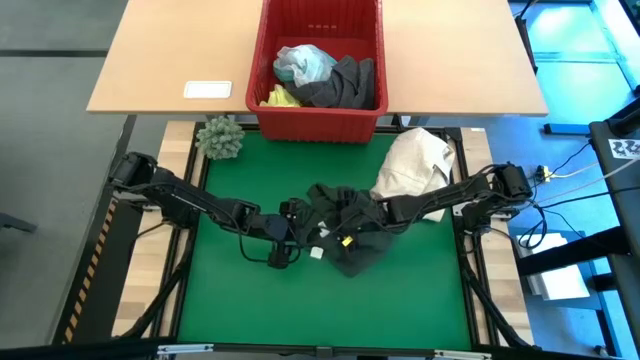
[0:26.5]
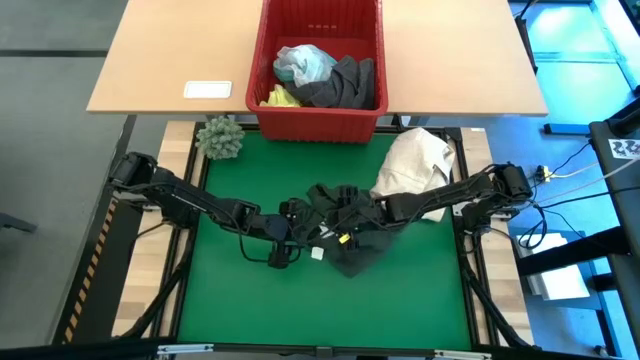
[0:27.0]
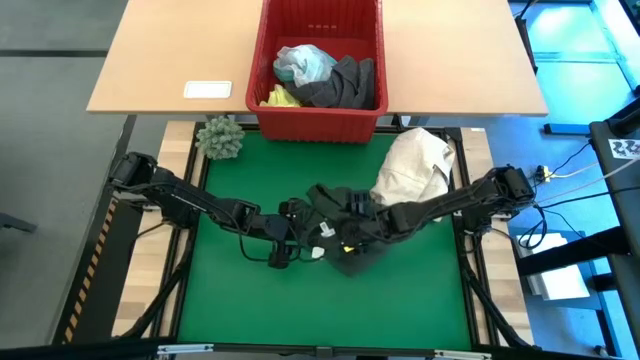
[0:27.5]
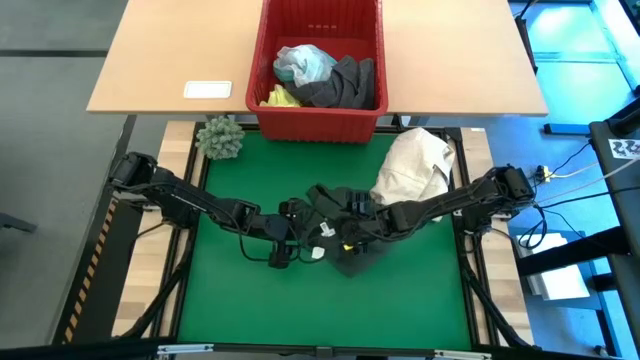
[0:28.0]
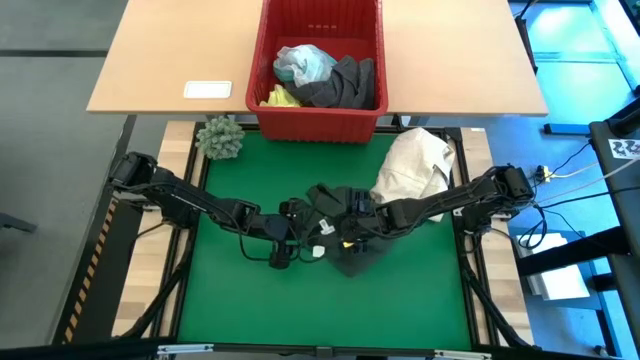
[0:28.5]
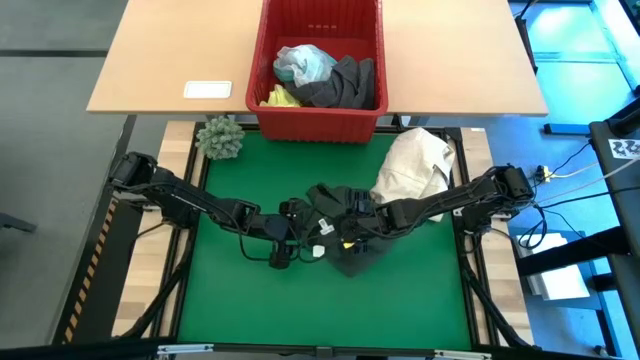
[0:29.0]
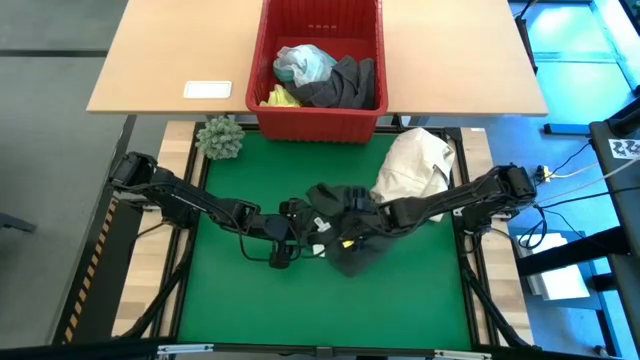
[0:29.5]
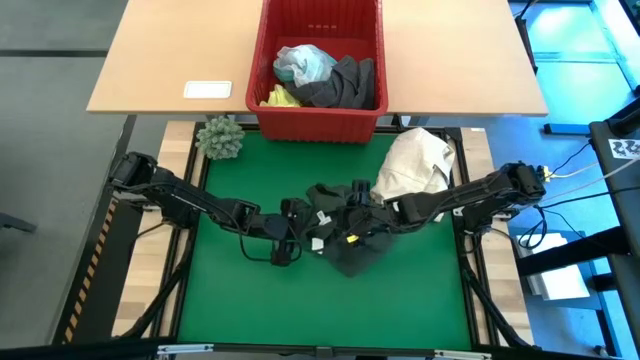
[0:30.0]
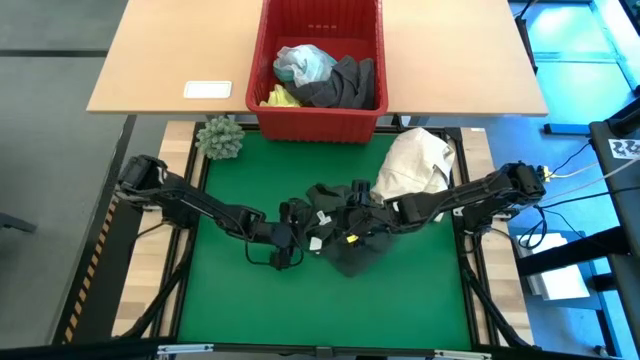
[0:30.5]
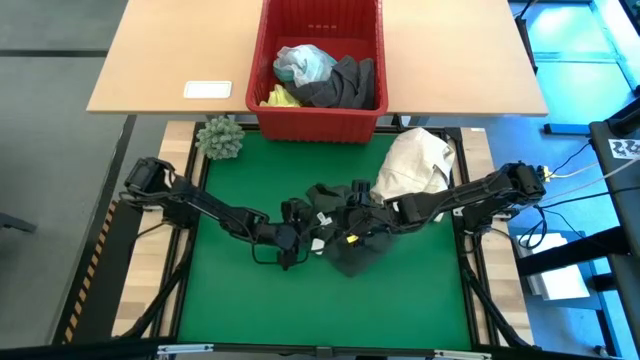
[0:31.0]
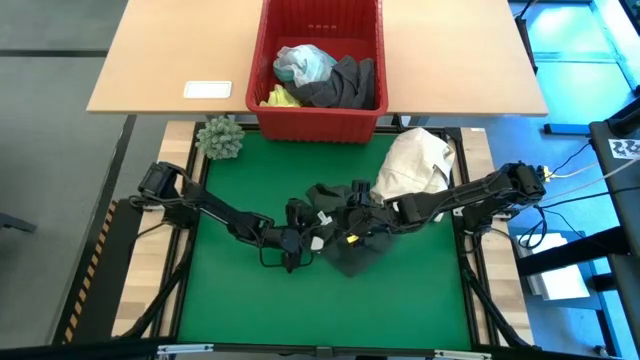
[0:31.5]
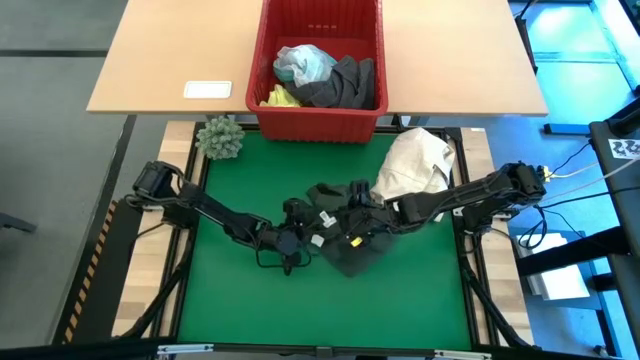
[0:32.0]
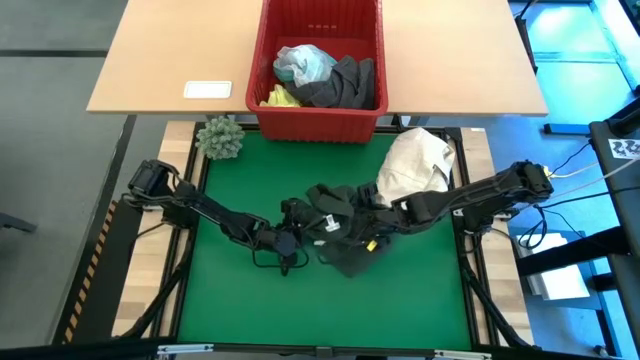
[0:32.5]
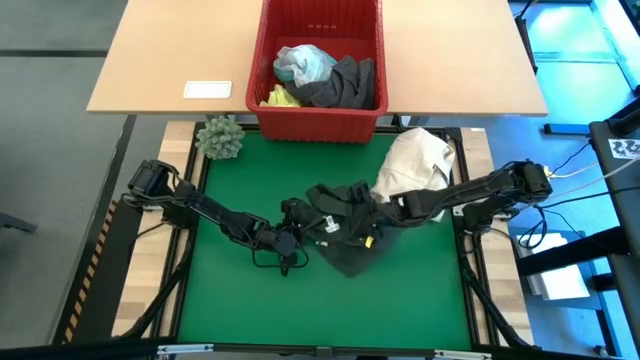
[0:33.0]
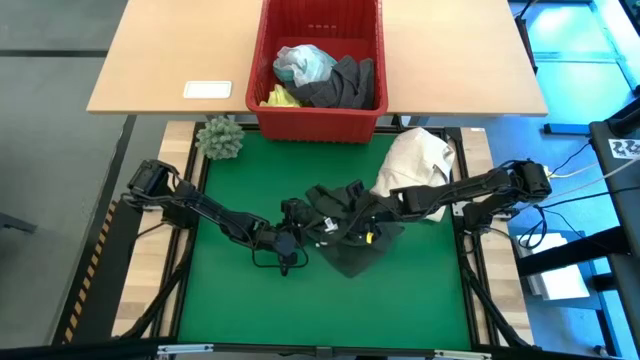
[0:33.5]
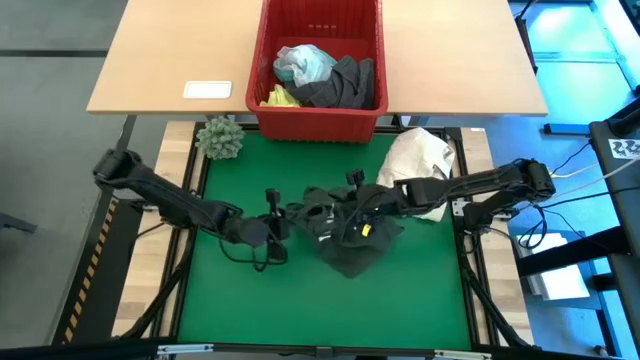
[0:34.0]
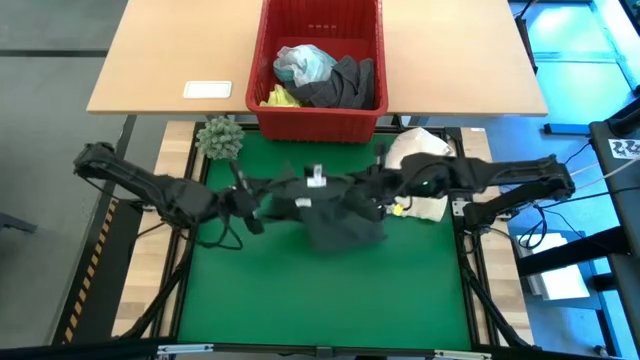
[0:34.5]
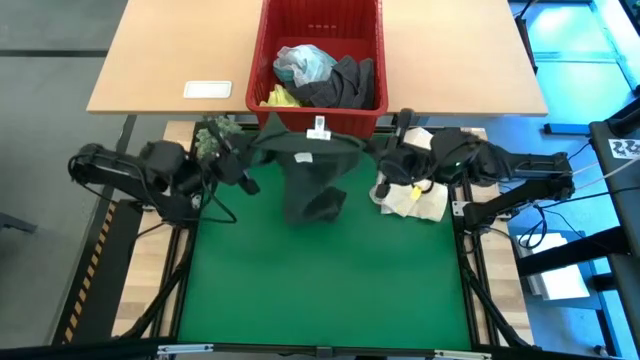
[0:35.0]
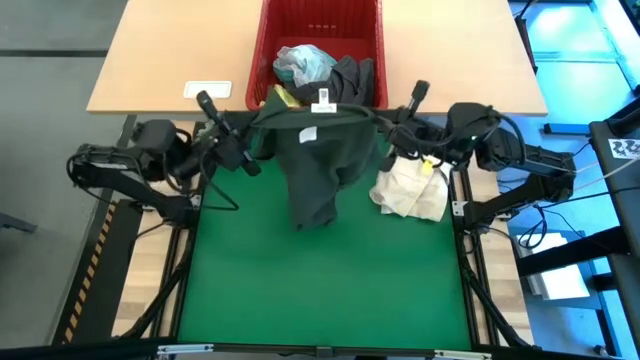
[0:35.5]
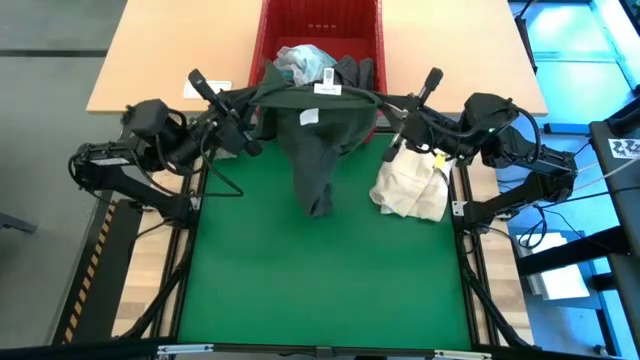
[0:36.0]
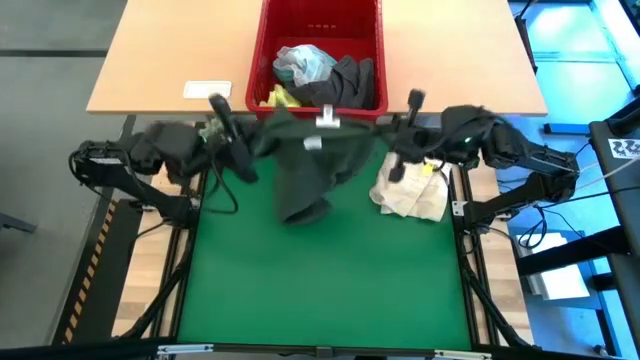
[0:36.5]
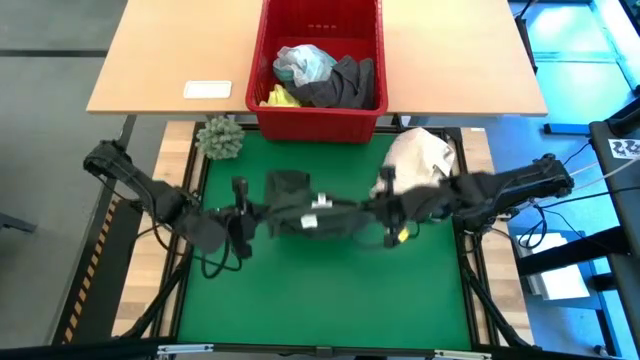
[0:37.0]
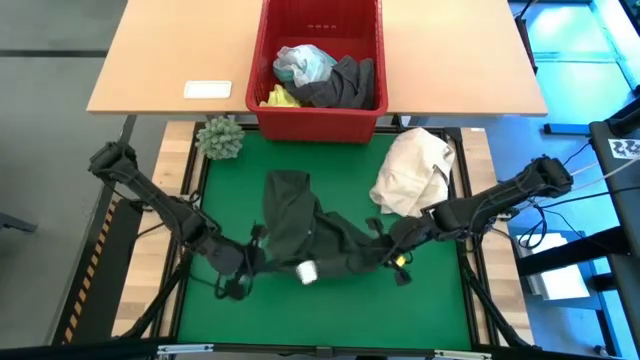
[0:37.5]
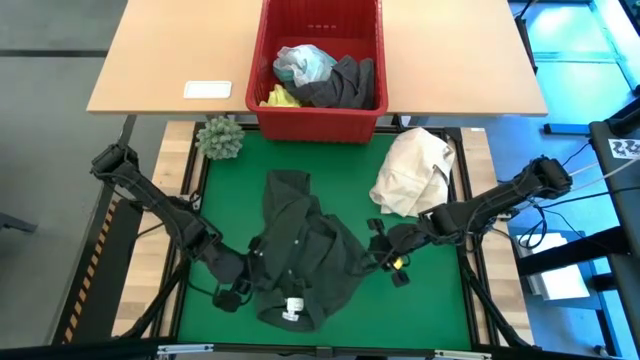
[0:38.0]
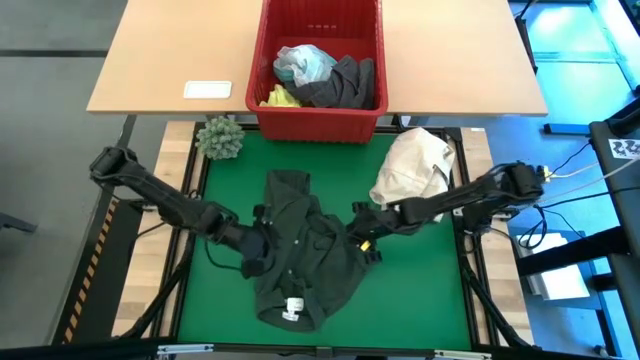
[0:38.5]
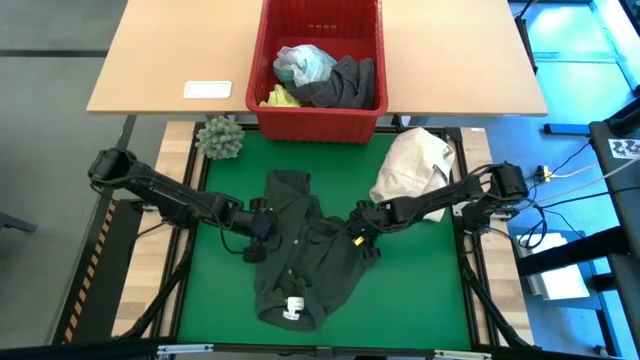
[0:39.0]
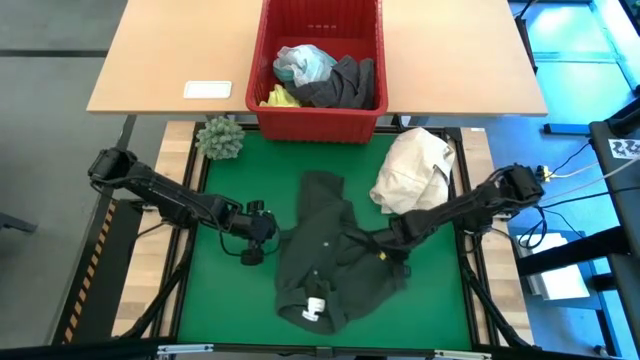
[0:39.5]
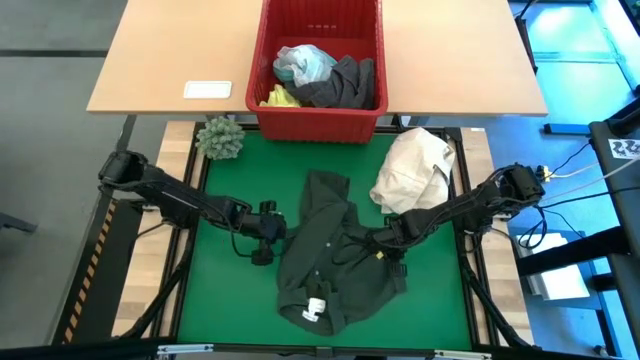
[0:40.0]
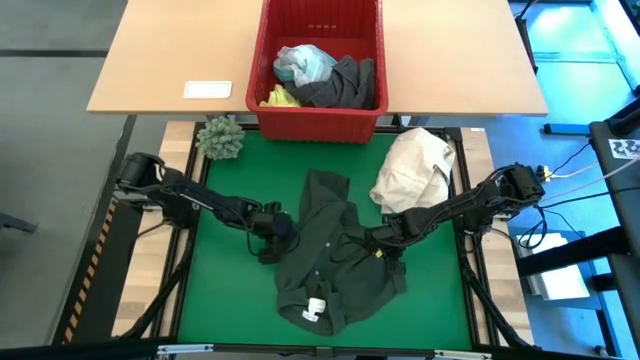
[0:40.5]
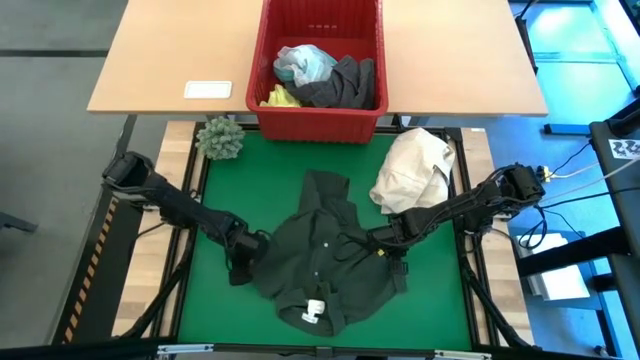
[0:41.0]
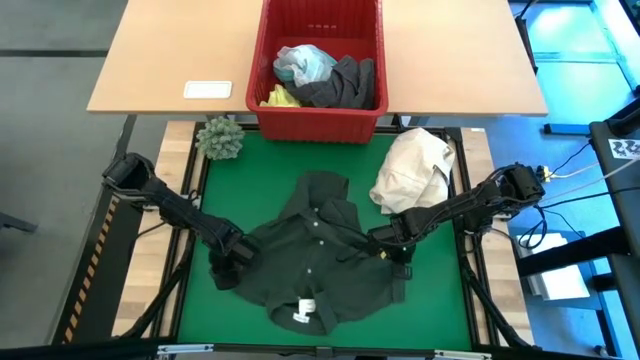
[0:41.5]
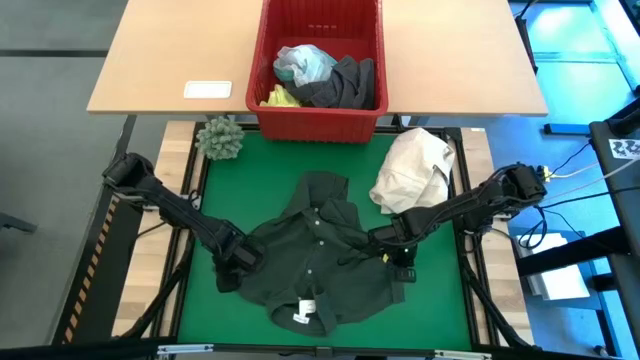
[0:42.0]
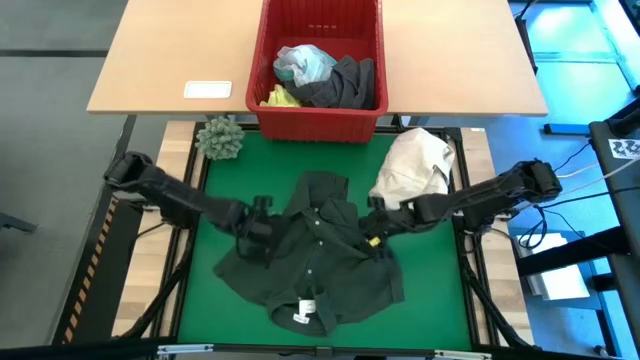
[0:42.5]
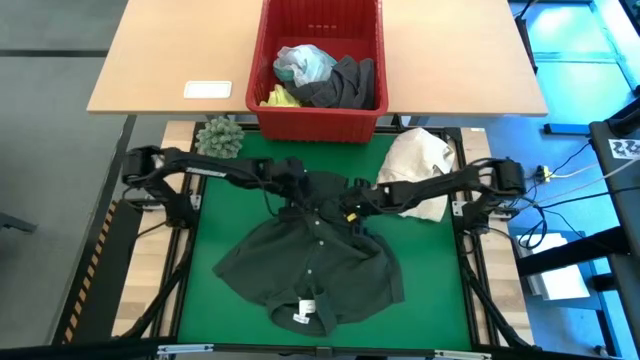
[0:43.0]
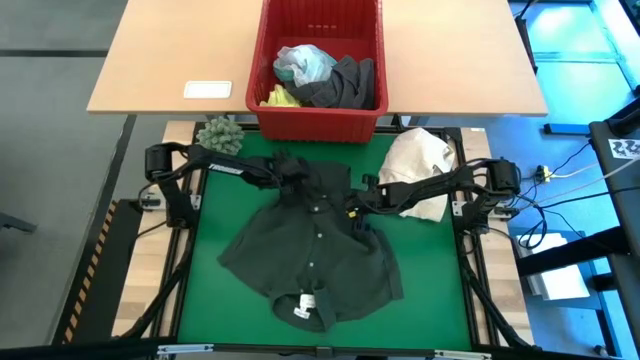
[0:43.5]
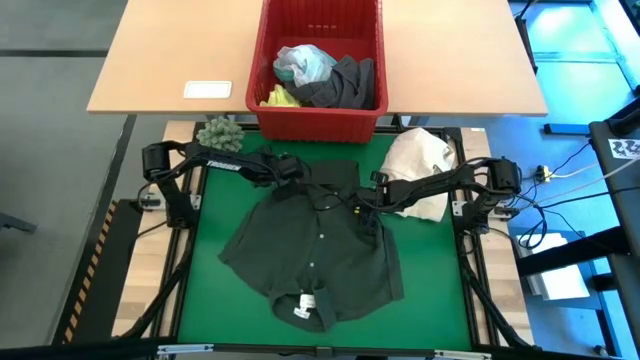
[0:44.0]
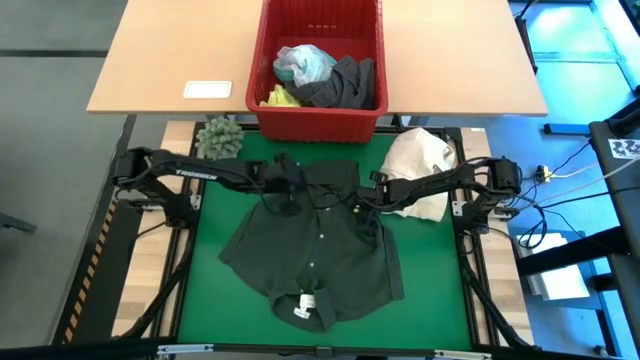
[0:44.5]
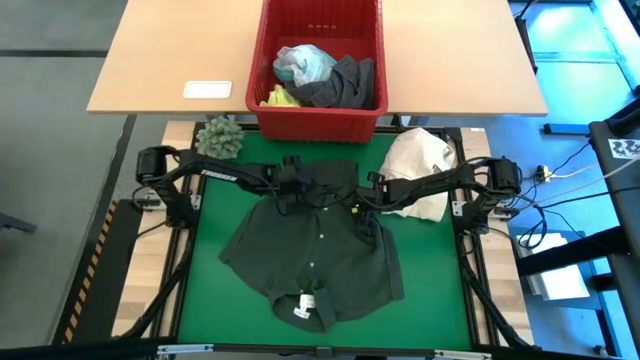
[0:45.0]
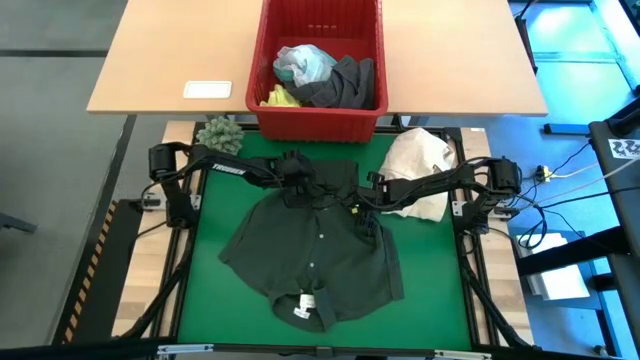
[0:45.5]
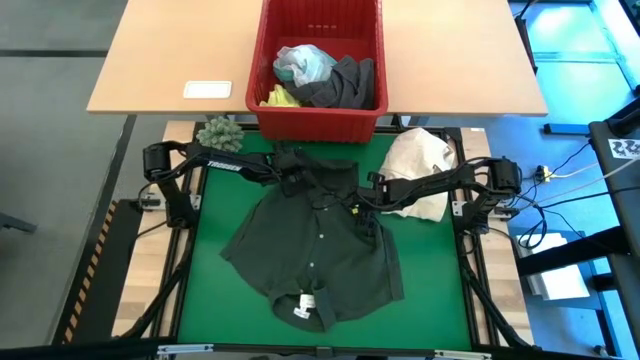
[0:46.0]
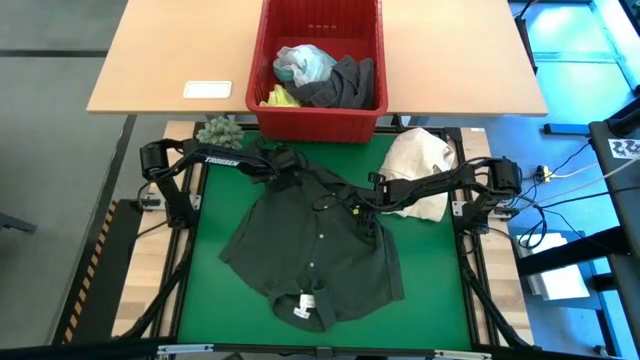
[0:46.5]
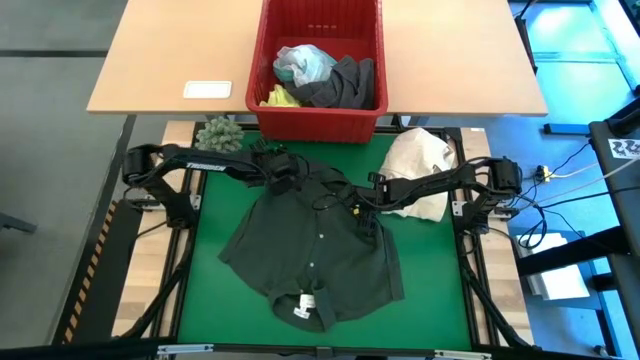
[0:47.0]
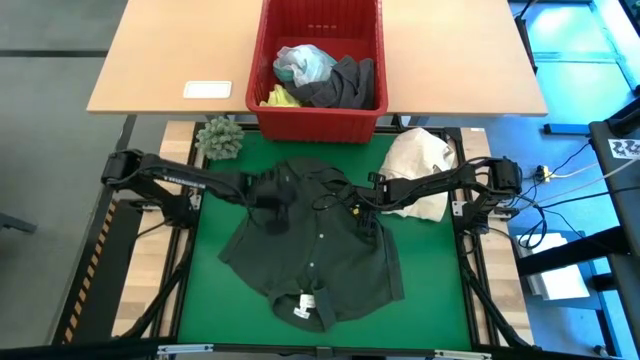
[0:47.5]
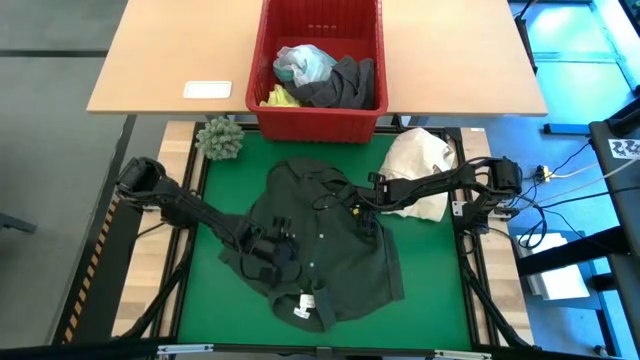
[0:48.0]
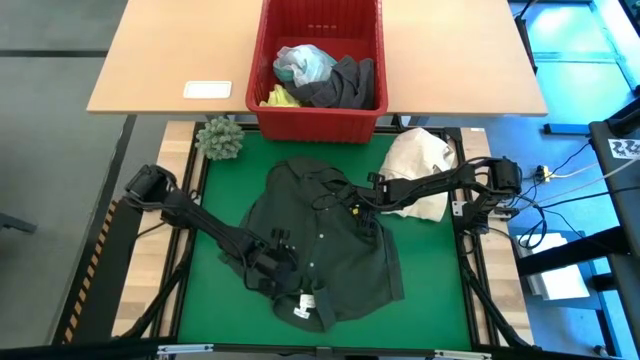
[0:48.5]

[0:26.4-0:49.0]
Task: Fold Laundry from Bin
Fold the dark green polo
